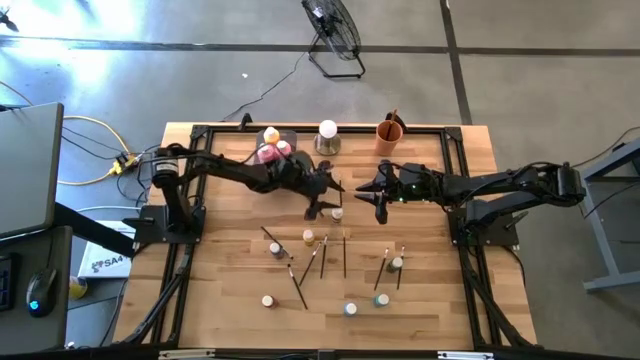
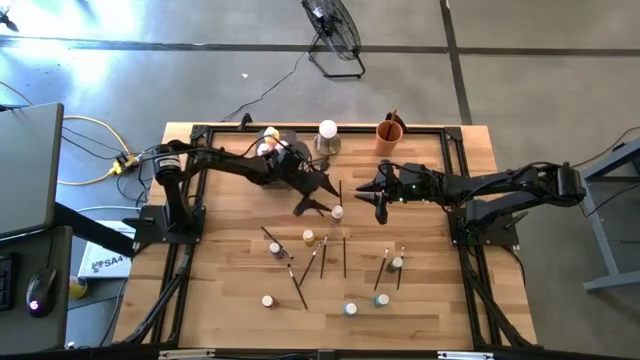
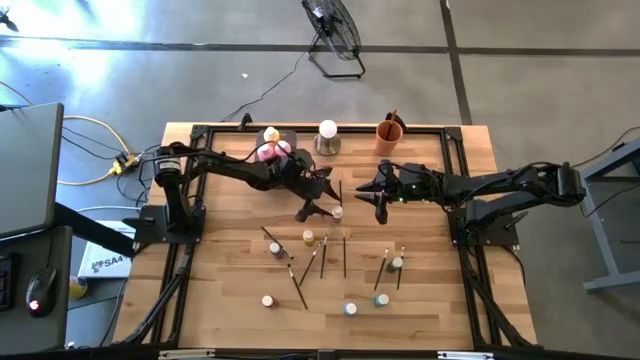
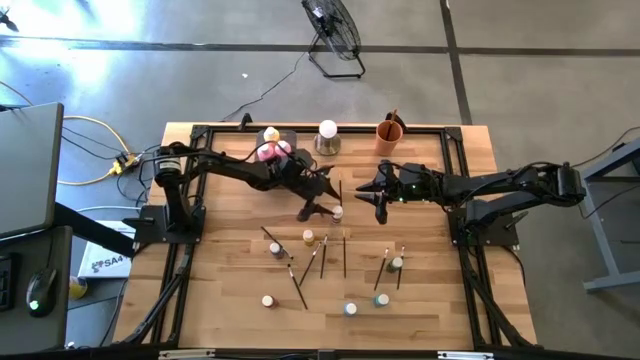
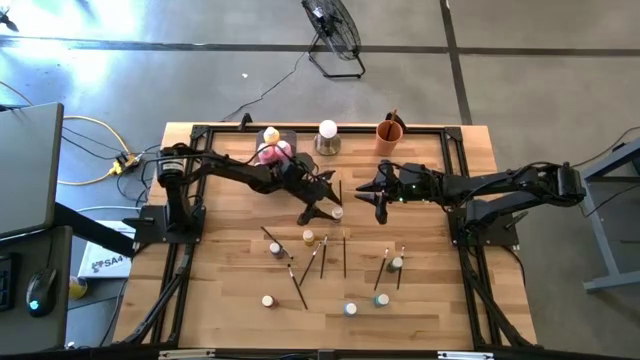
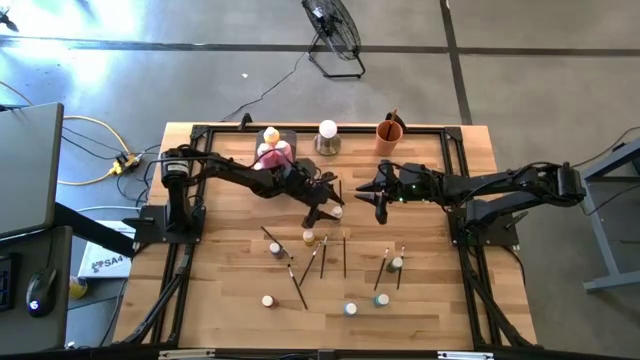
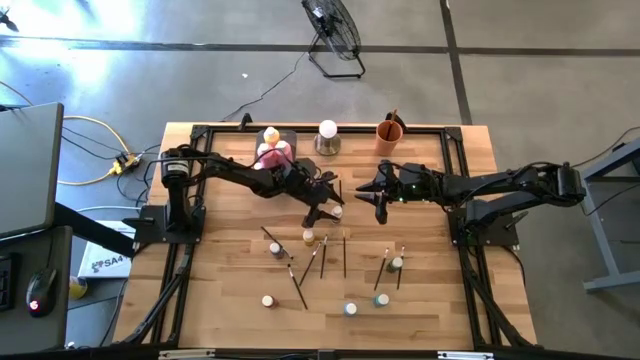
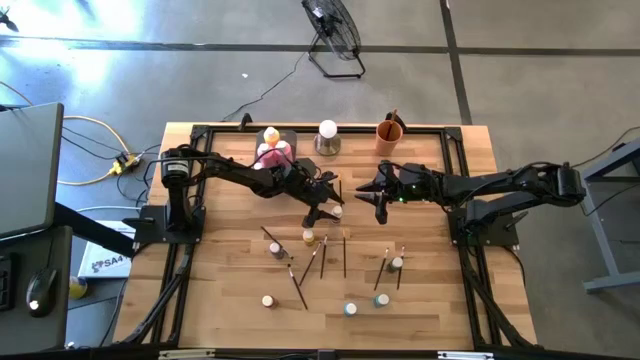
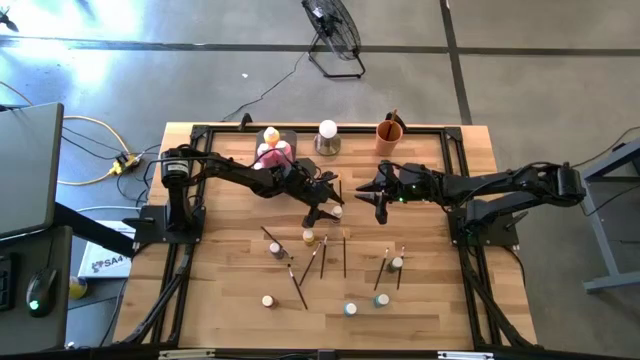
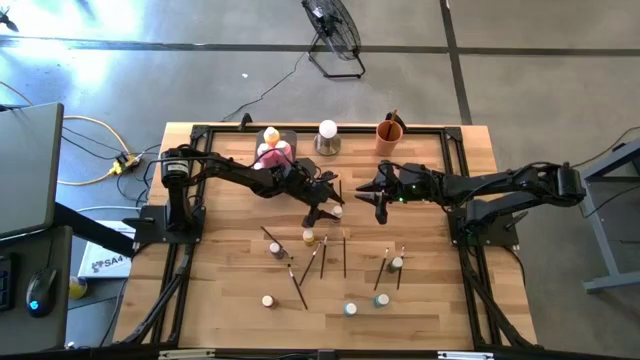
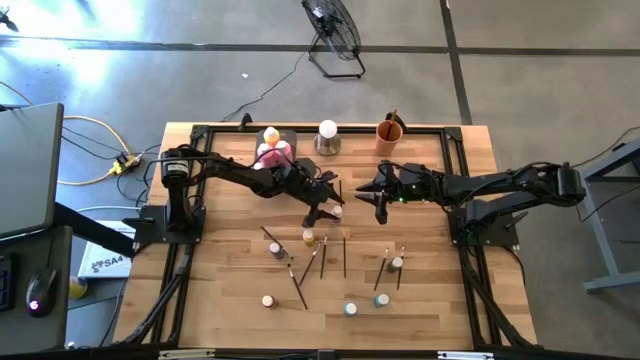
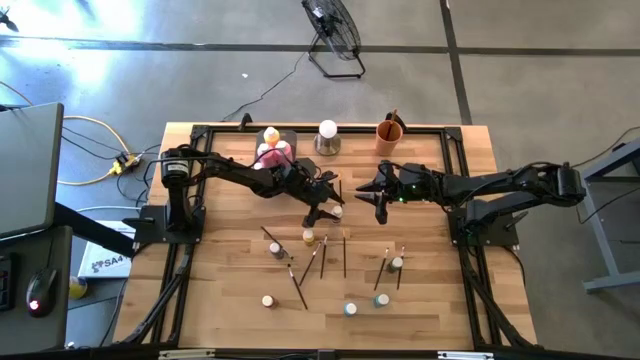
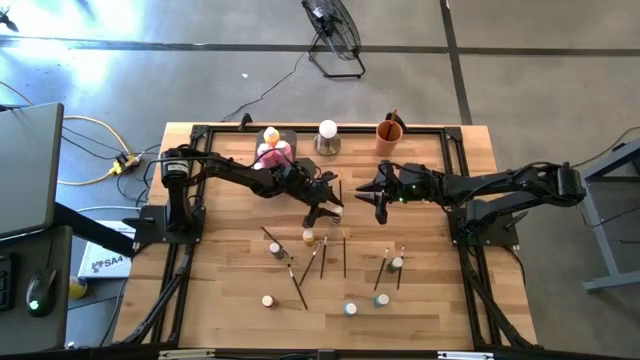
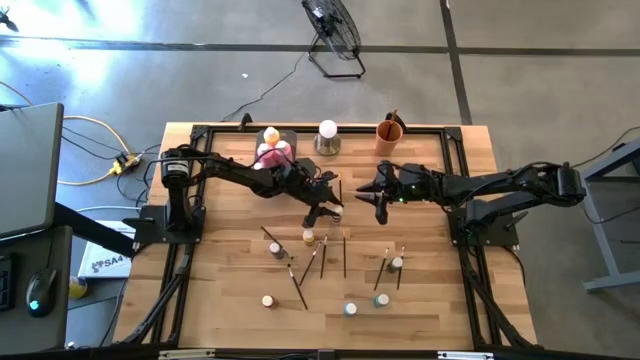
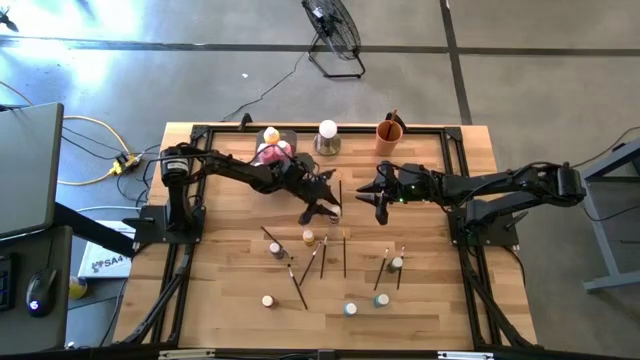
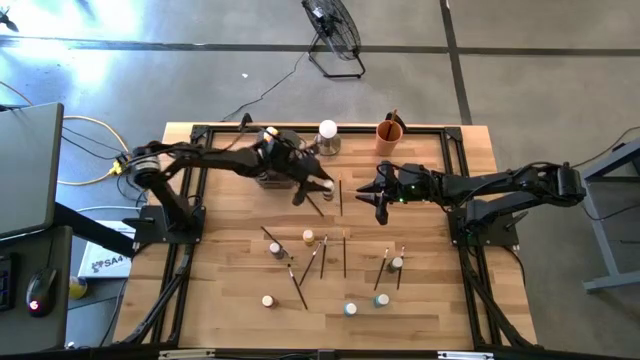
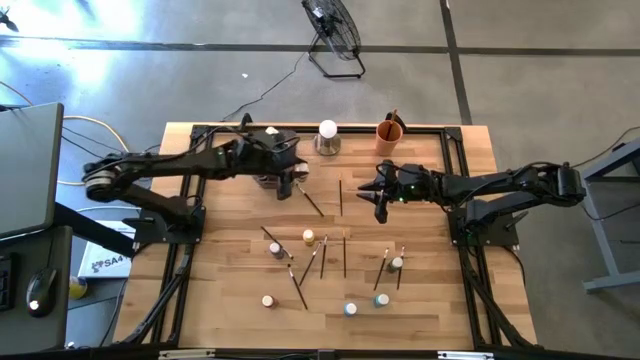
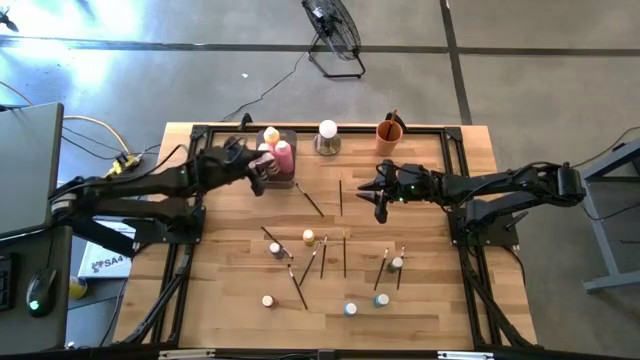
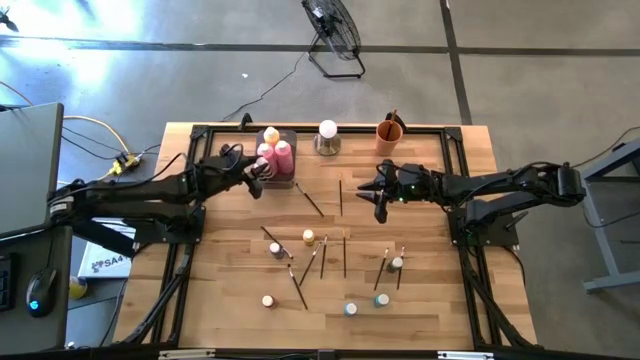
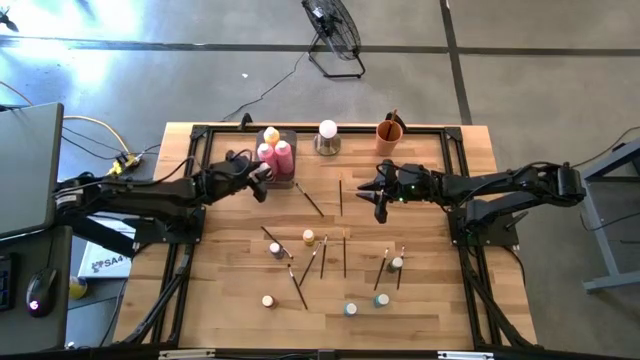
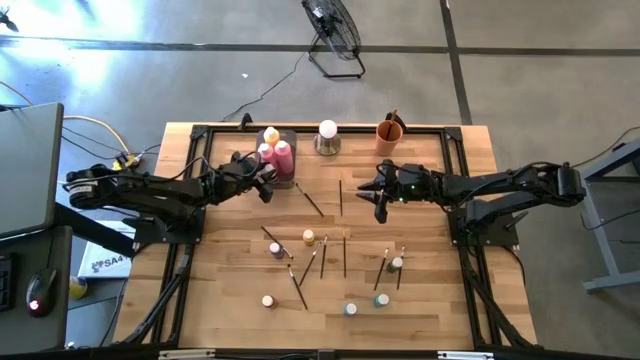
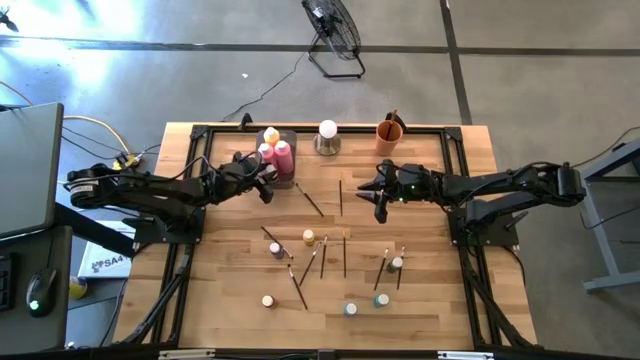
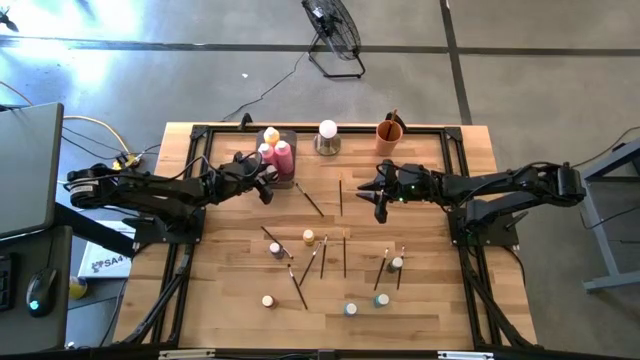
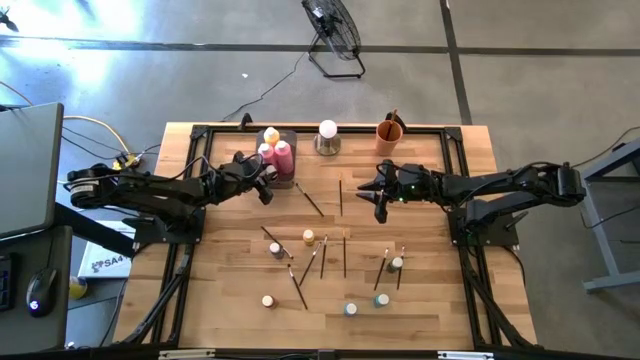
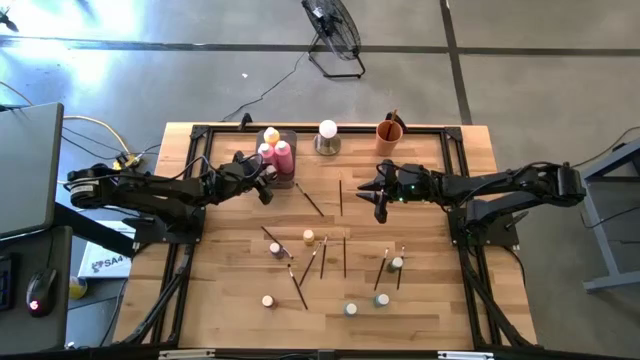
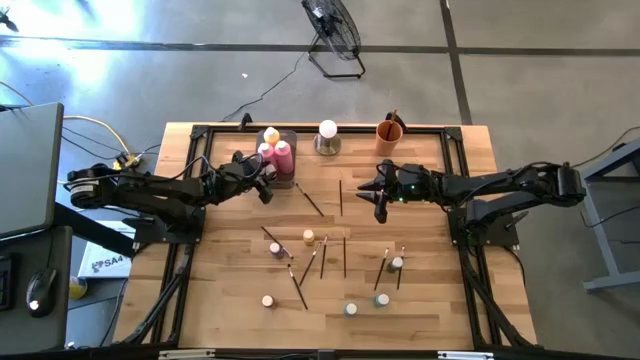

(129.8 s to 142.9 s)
Task: Pick & Place Paint Supplies
Put the small white black paint bottle into the gray bin

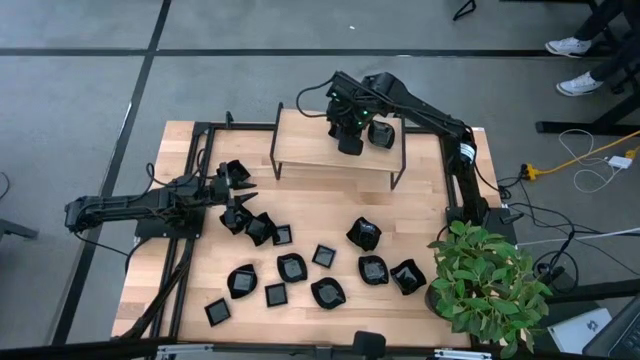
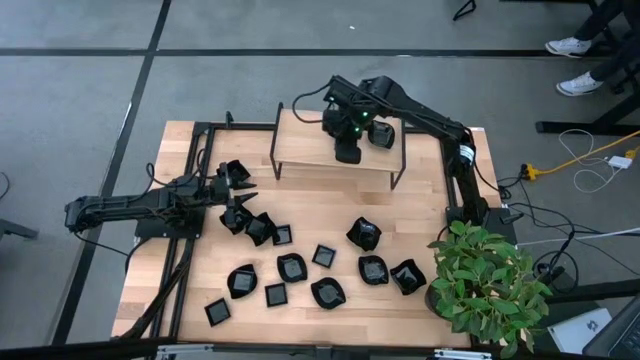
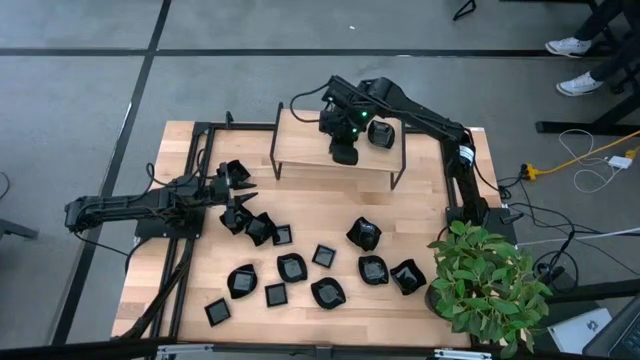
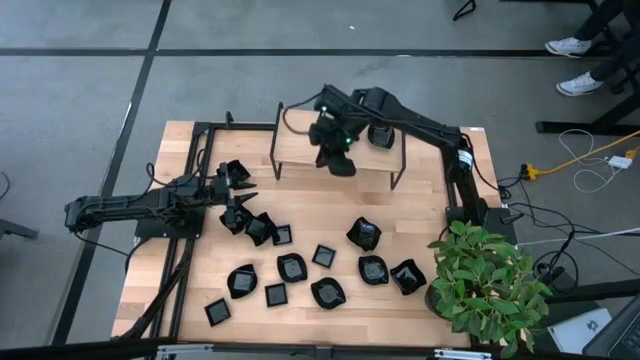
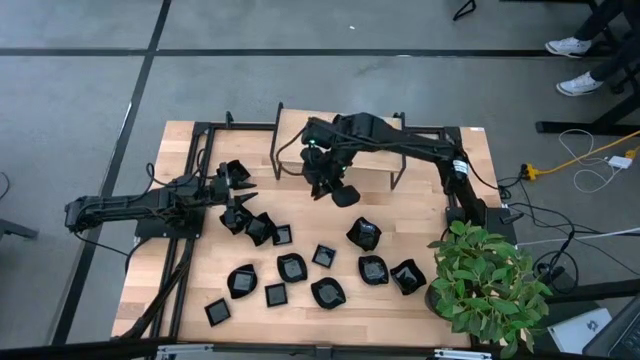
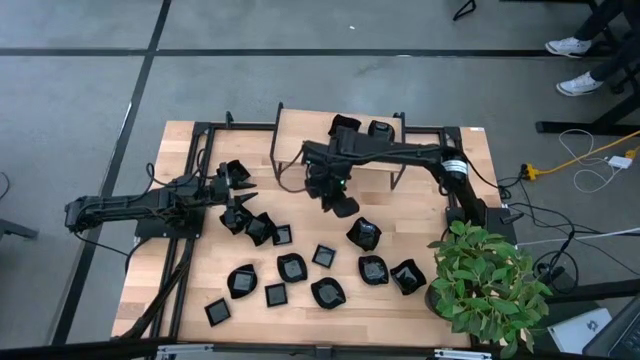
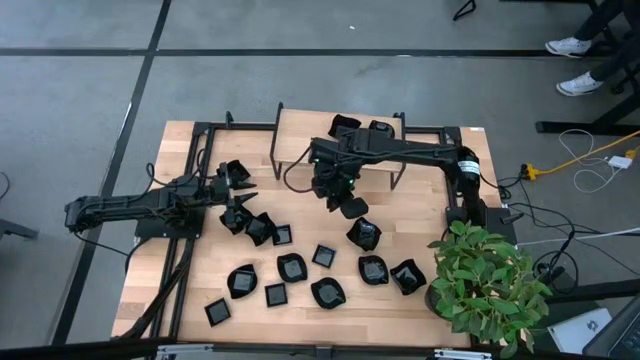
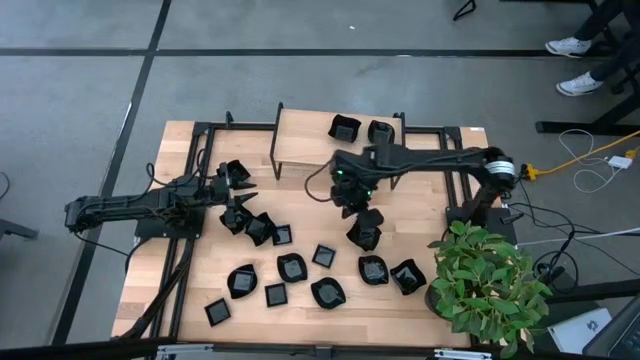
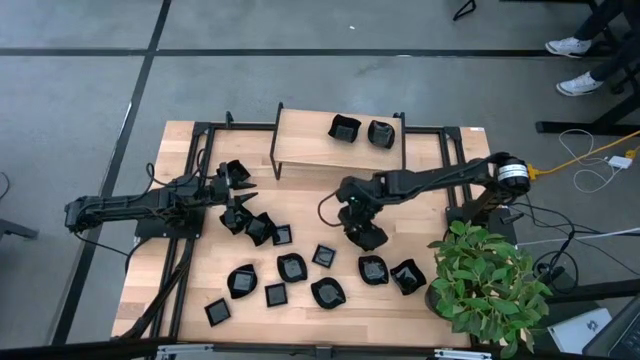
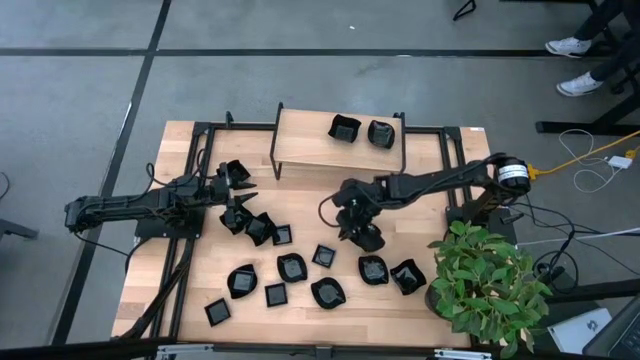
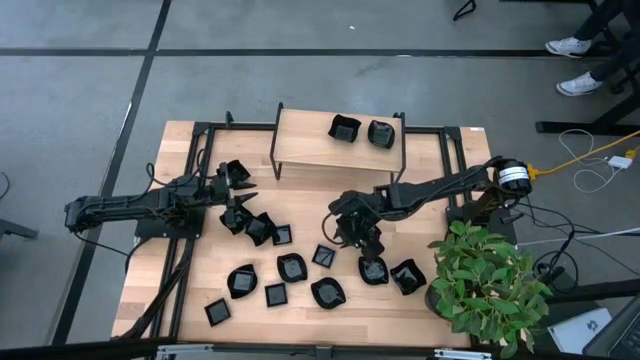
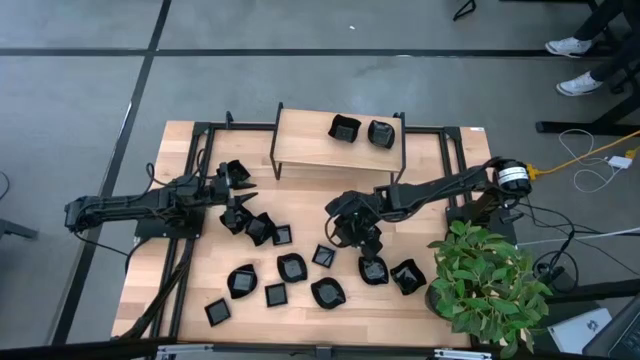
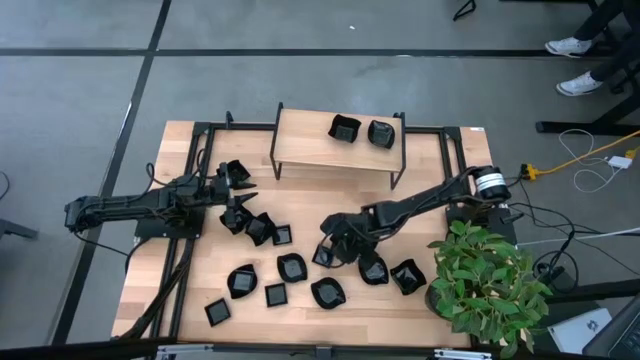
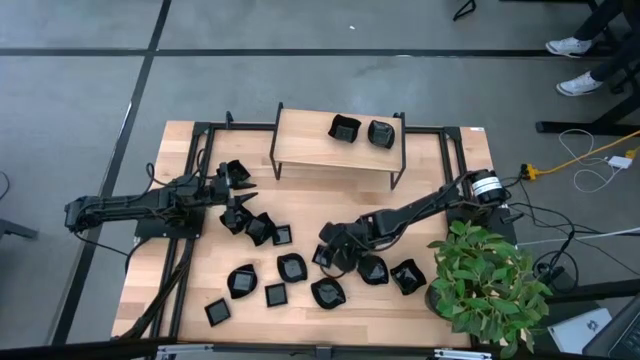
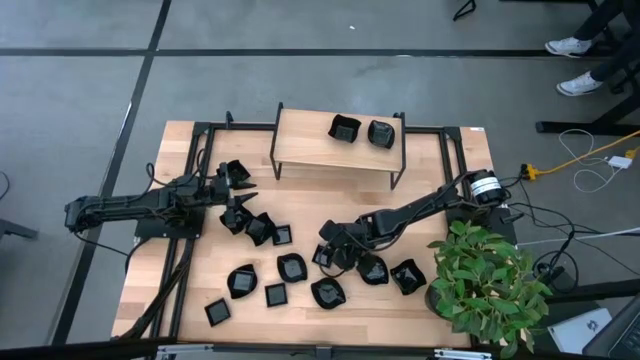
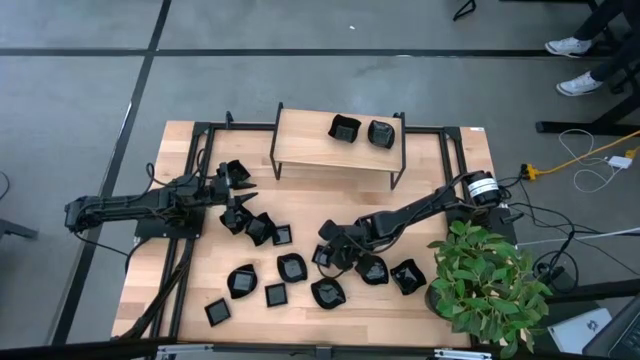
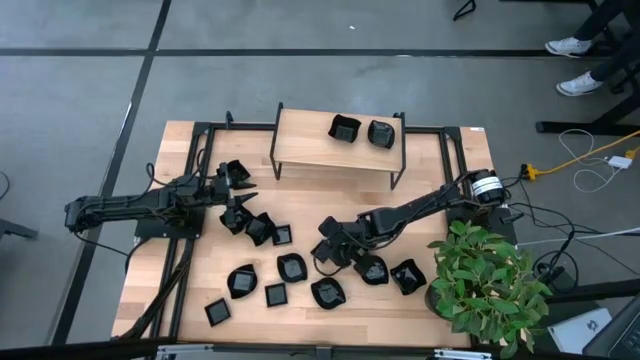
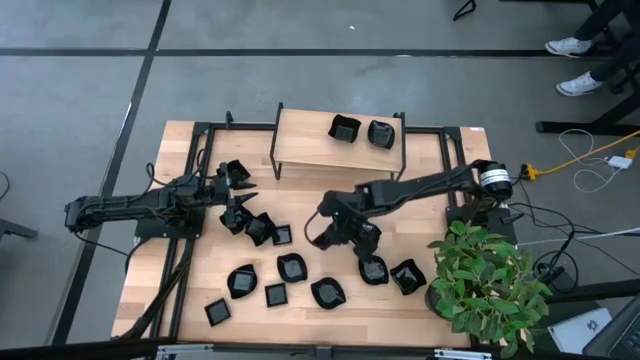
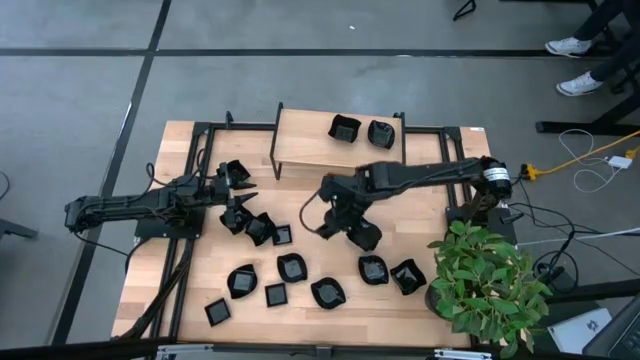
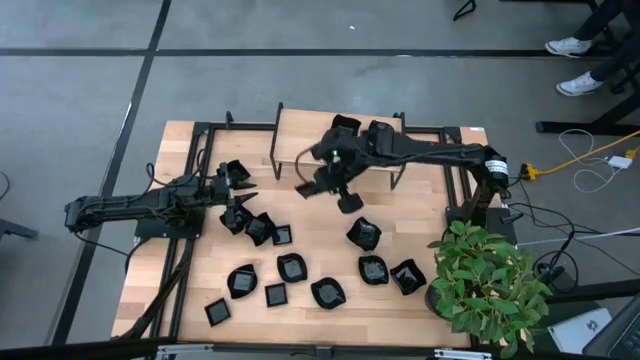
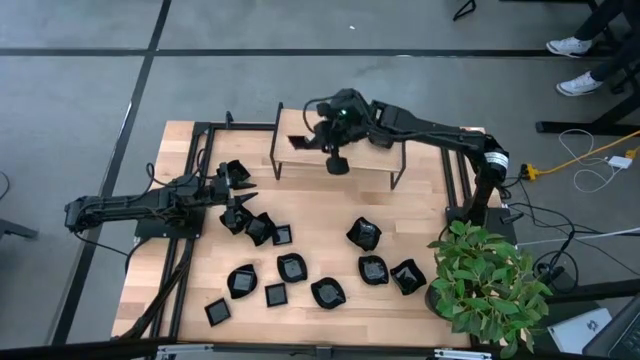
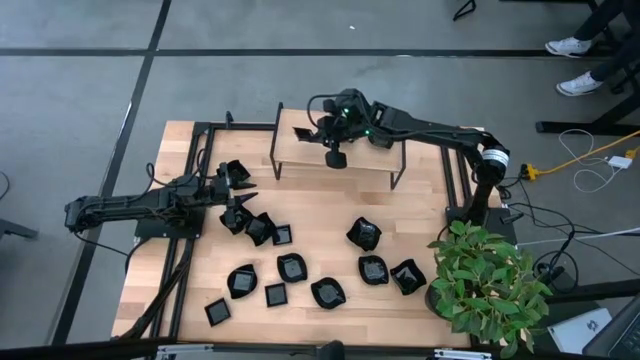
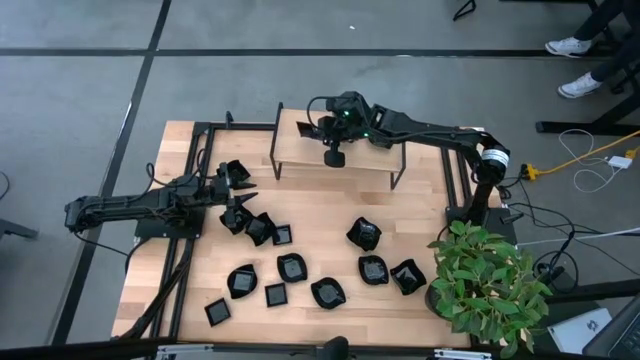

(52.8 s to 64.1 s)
Task: Pick & Place Mini shaped plates
Put the square plate on the shelf
